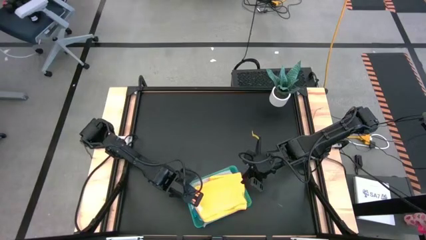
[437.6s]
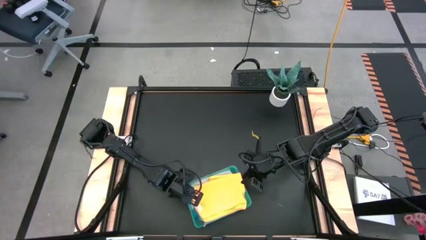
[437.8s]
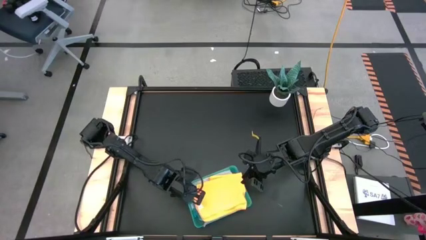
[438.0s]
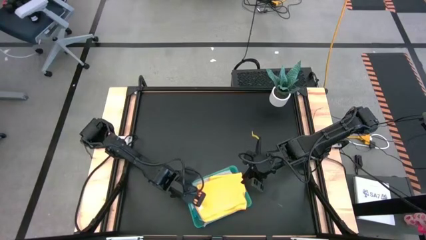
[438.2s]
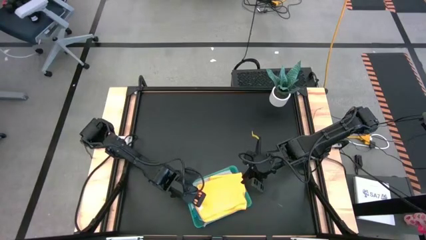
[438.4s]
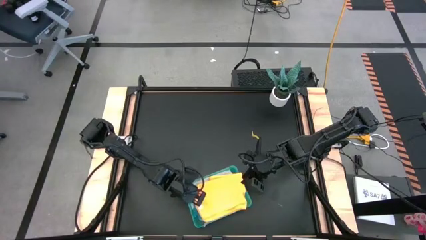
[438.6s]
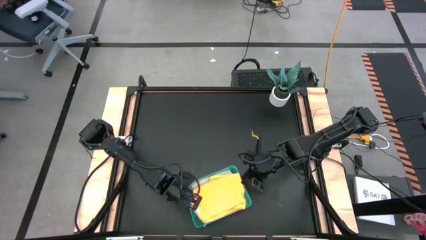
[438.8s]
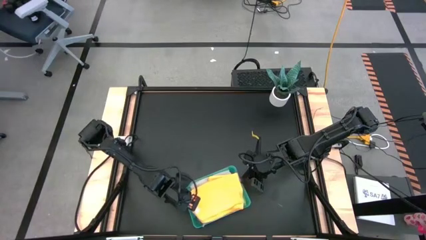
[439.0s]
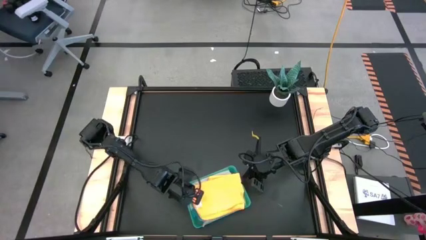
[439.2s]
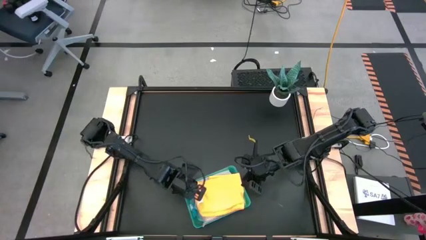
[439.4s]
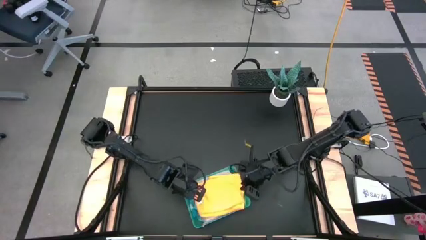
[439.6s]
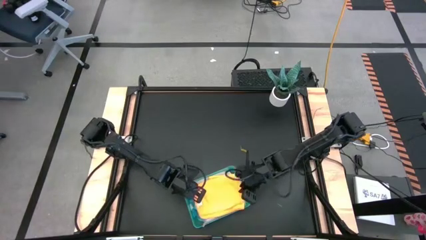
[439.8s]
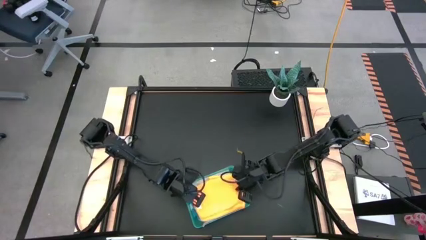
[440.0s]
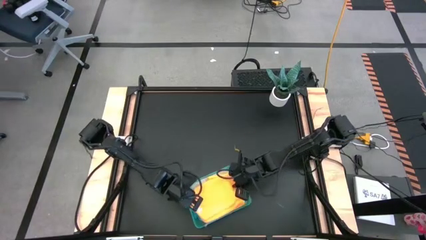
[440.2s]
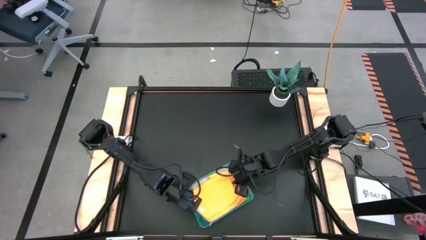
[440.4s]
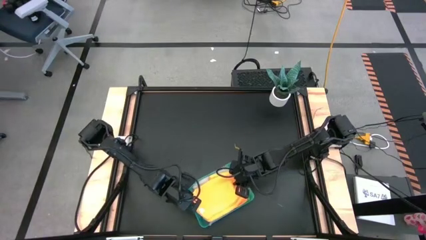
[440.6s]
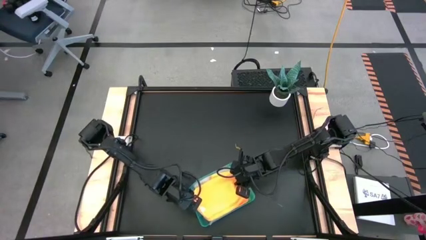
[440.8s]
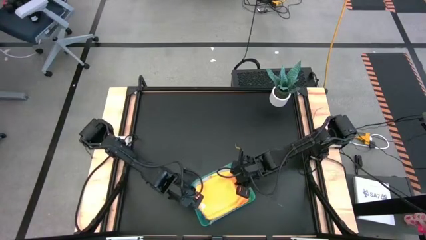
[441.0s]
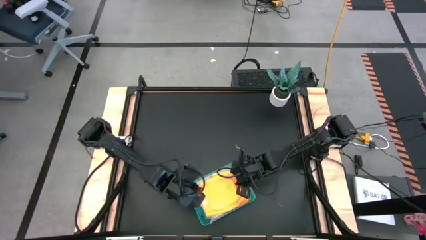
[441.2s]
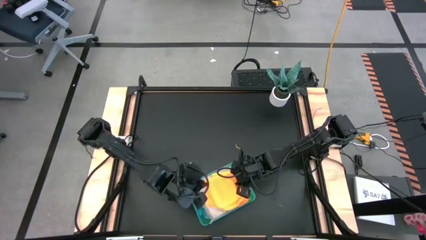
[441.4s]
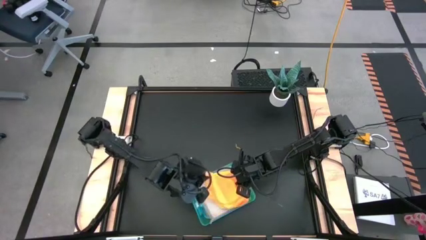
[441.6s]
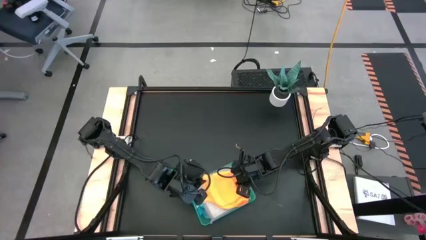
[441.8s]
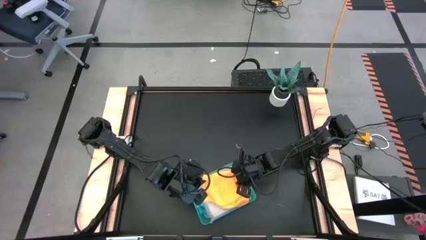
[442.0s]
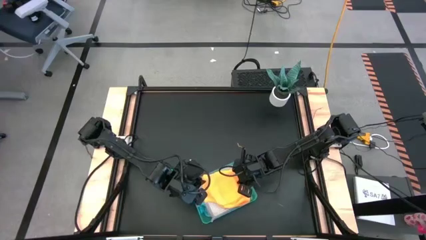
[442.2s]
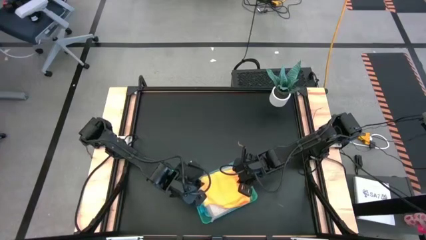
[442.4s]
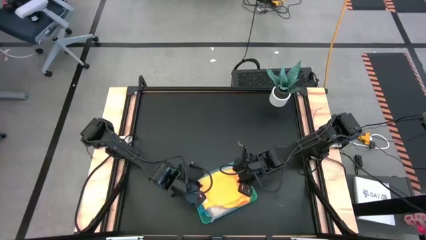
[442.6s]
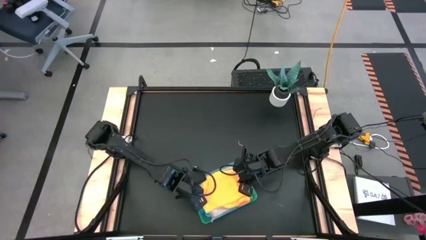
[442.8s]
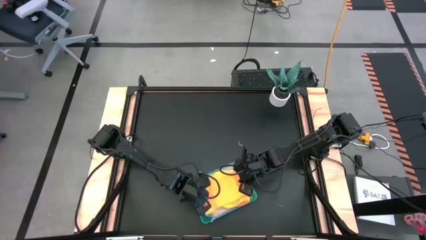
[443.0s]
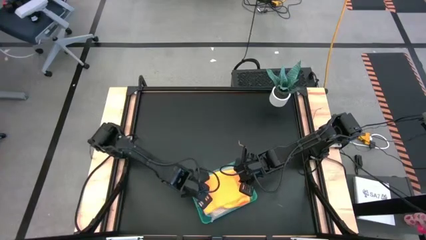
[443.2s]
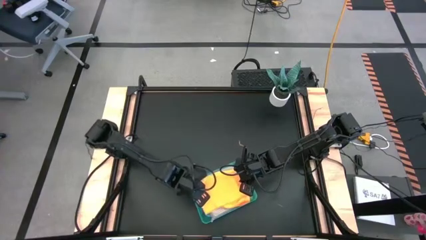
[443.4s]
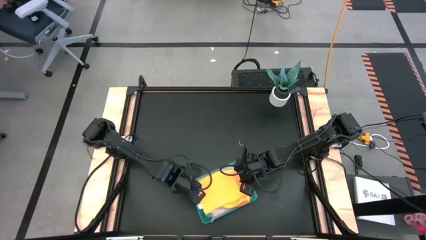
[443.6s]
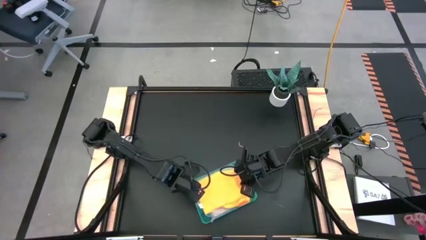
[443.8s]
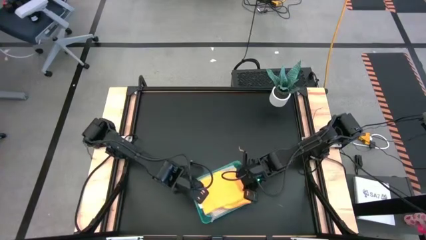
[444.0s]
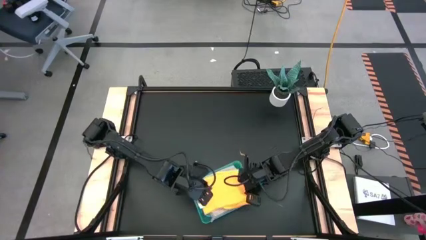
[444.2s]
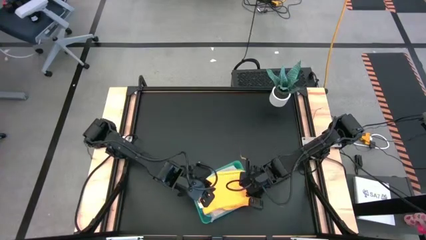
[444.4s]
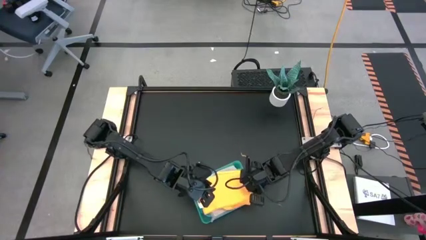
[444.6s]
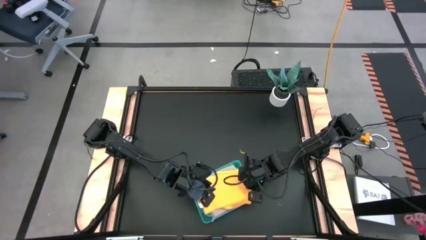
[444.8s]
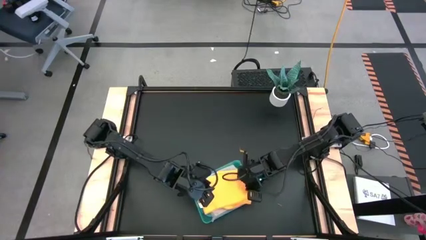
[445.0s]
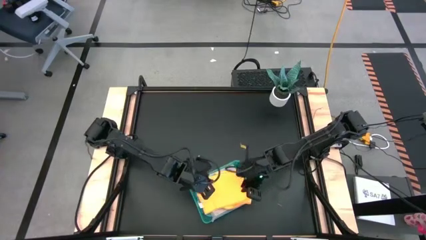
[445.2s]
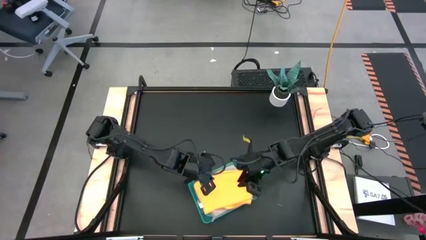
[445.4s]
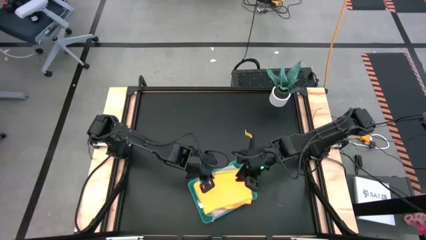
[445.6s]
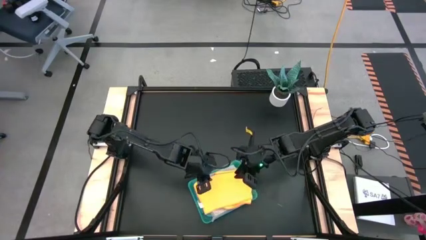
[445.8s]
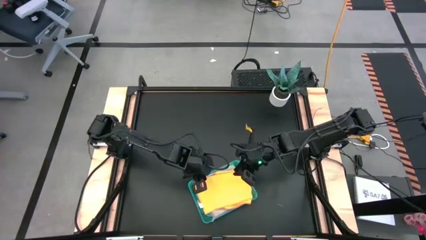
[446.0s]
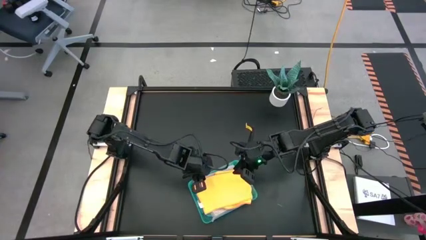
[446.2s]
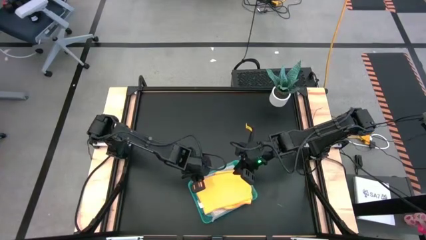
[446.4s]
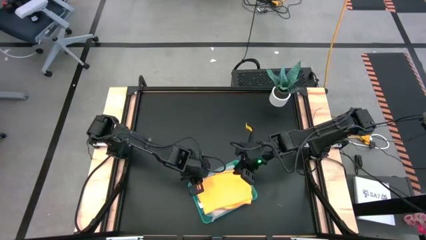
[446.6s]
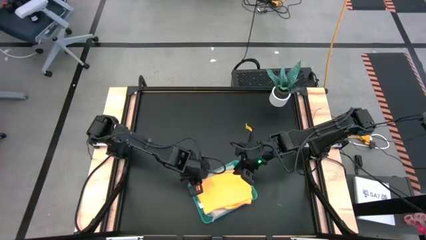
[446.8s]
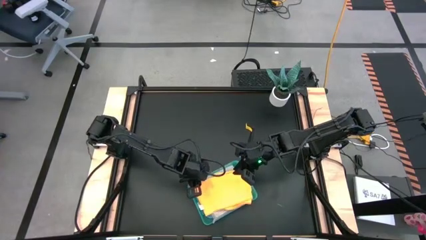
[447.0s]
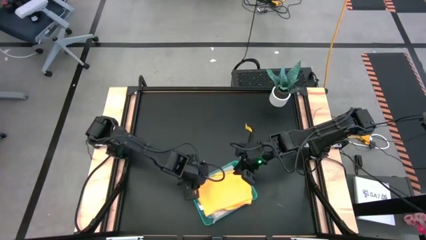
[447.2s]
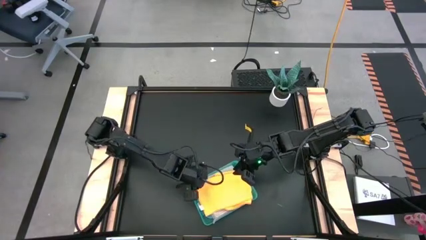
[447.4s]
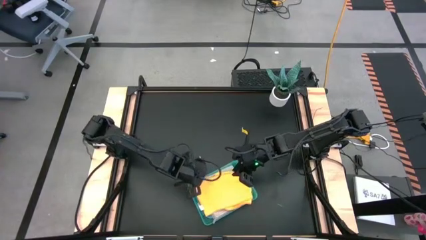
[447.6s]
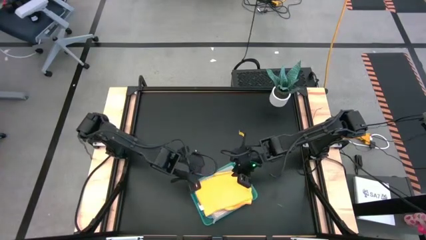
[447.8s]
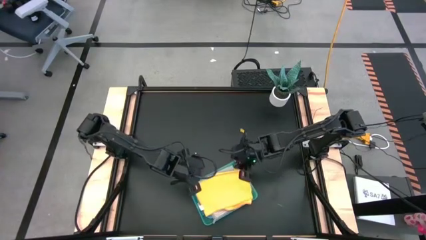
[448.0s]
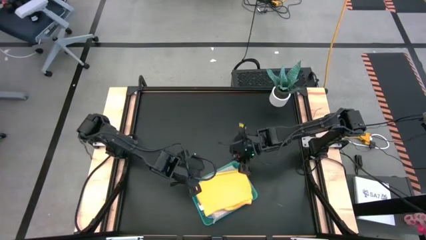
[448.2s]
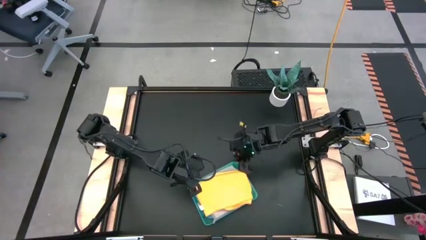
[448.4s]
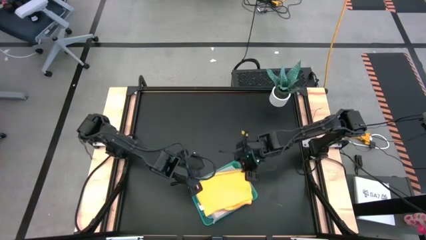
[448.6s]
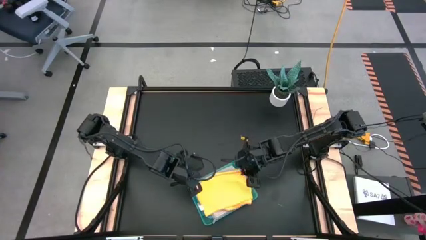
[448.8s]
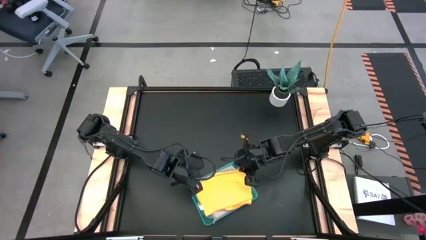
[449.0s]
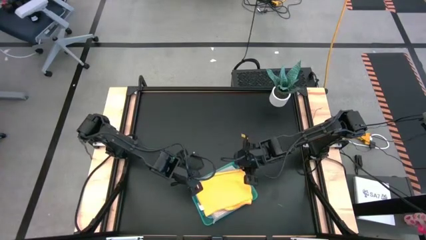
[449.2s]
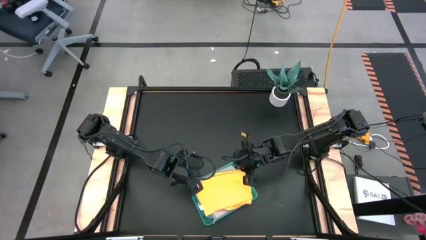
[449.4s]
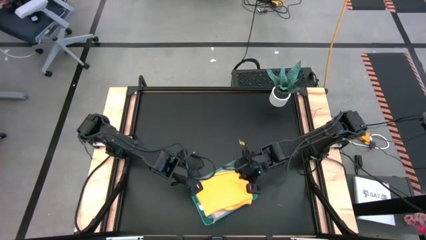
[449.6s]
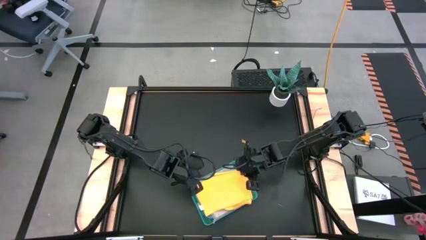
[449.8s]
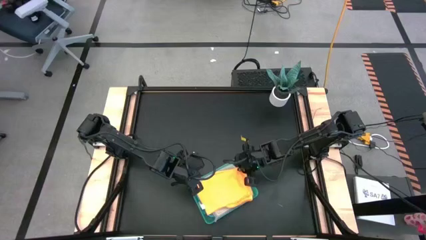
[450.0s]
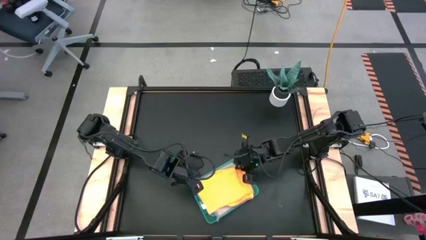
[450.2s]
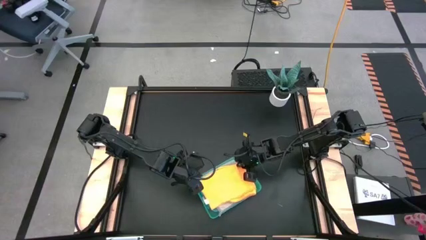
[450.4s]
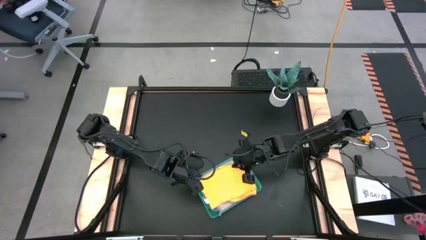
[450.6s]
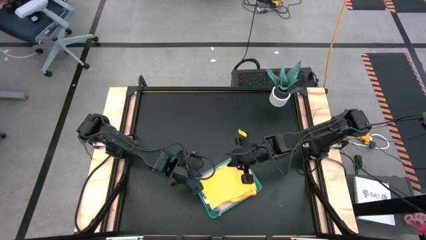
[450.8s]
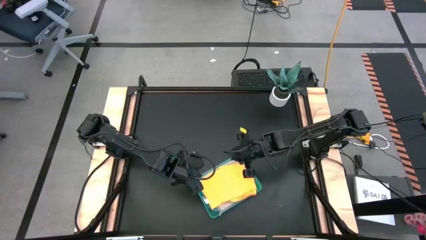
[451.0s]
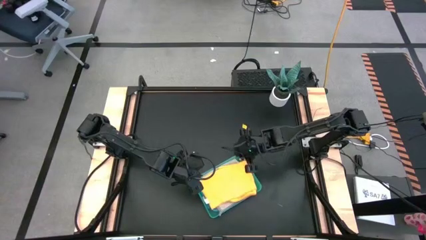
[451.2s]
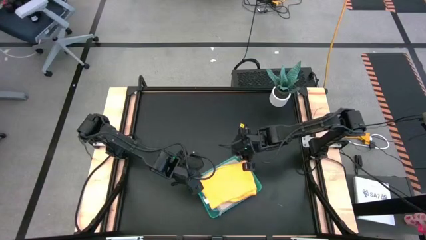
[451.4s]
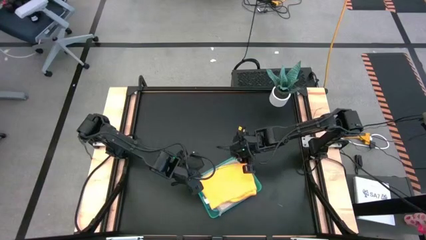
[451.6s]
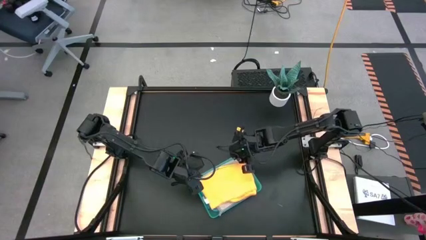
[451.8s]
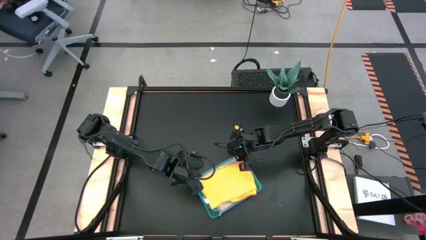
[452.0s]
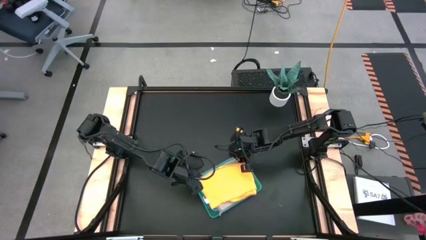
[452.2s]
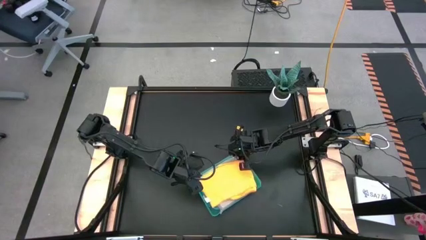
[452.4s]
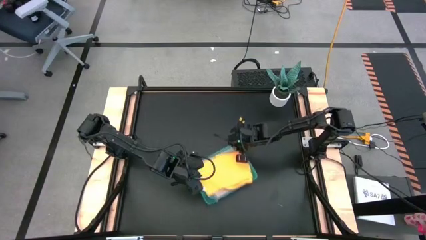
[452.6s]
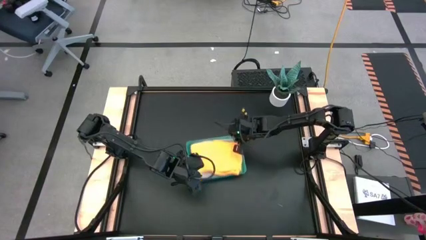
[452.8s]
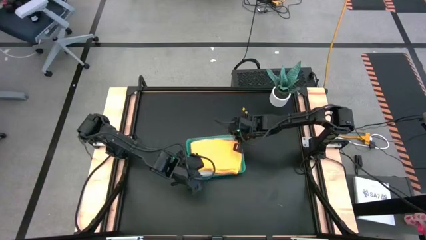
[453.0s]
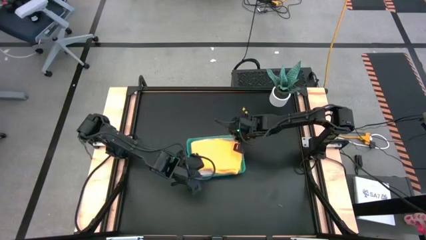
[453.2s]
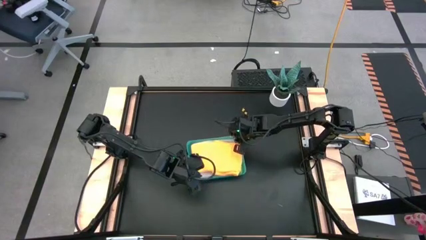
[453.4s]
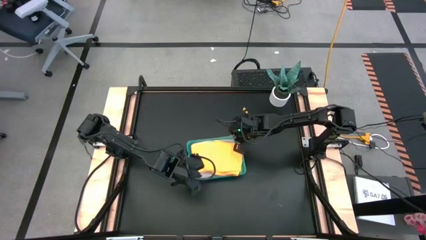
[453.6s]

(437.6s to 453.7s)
Task: Fold microfiber towels
Put the folded orange microfiber cloth into the green transparent bin
